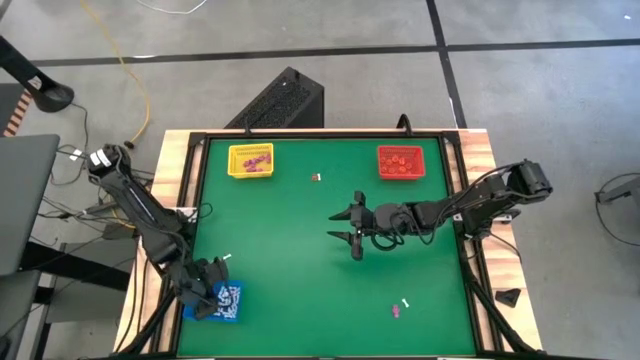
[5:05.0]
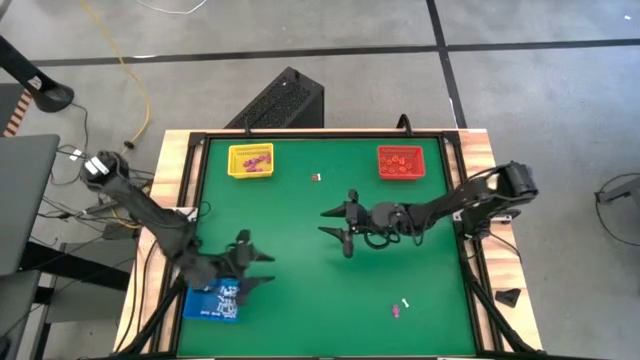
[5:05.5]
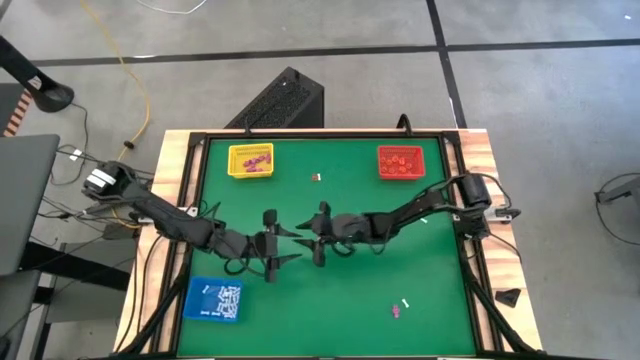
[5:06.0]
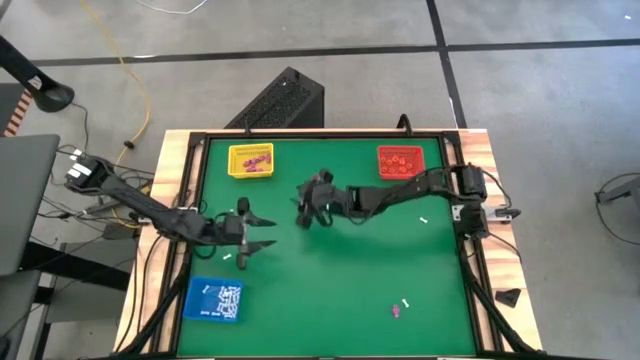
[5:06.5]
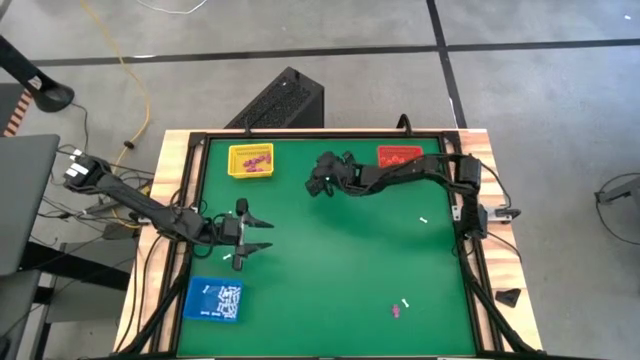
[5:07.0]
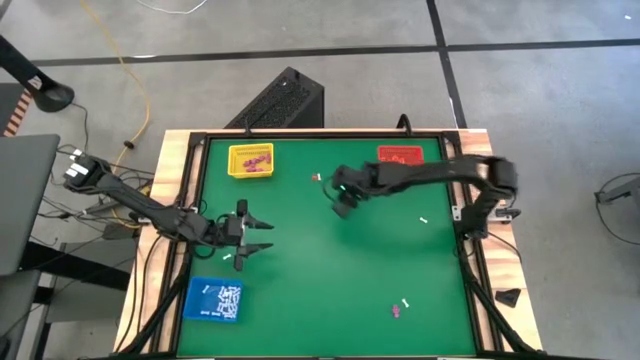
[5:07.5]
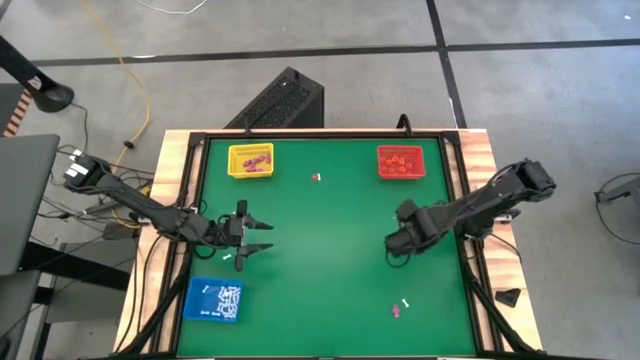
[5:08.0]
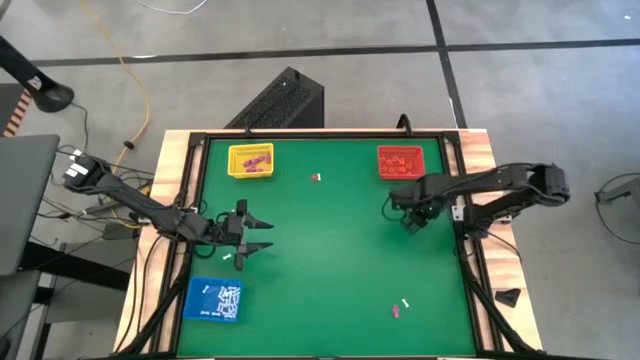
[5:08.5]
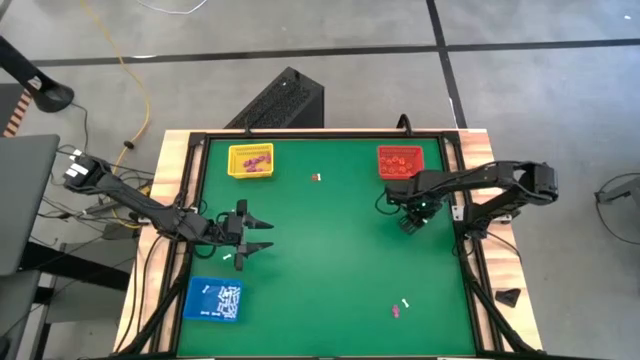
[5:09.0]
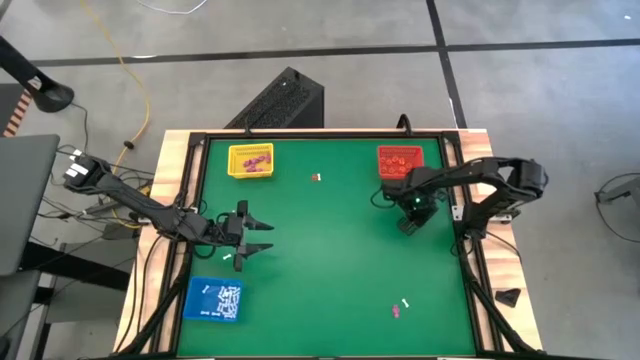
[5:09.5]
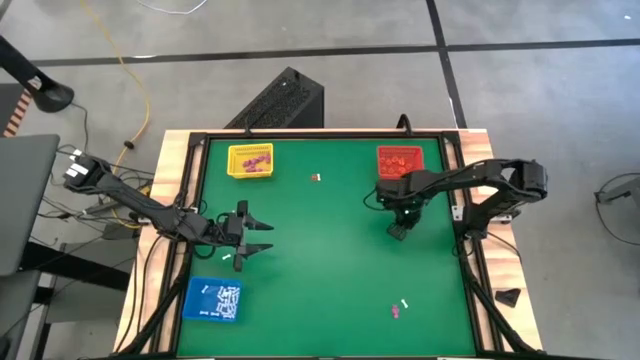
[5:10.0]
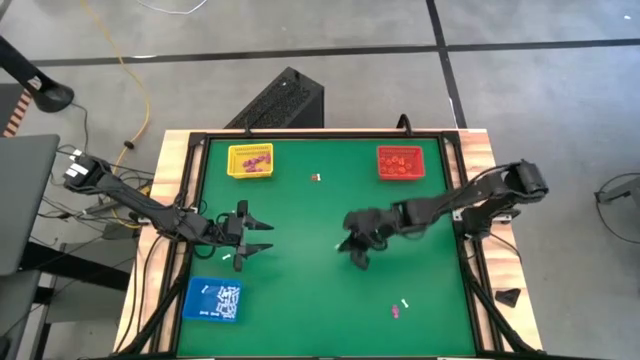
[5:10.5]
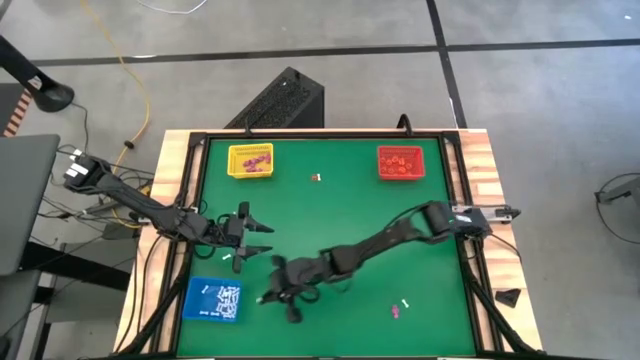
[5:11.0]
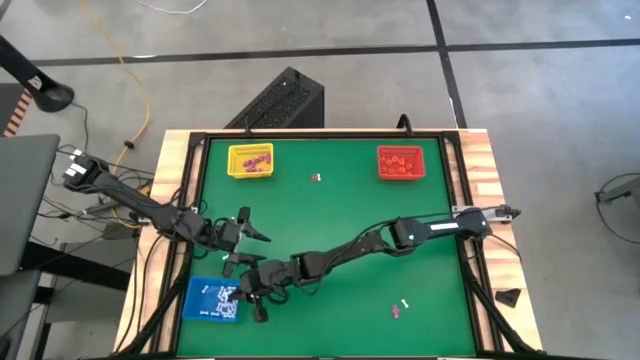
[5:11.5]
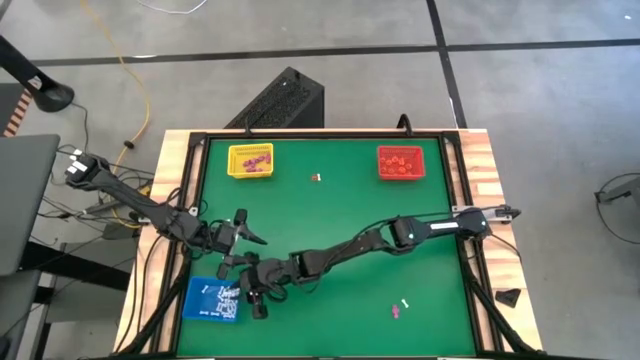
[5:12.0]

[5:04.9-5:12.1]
Task: Sort Halloween decoration
Put the white bone toy into the blue bin

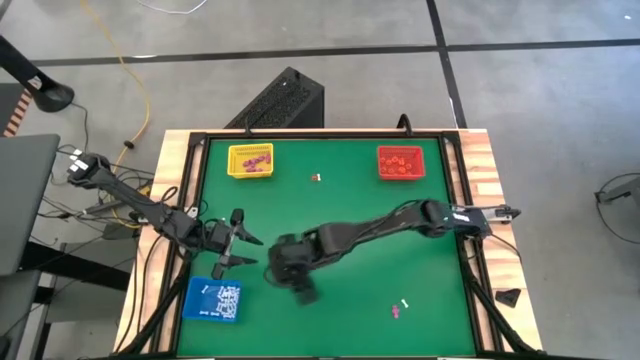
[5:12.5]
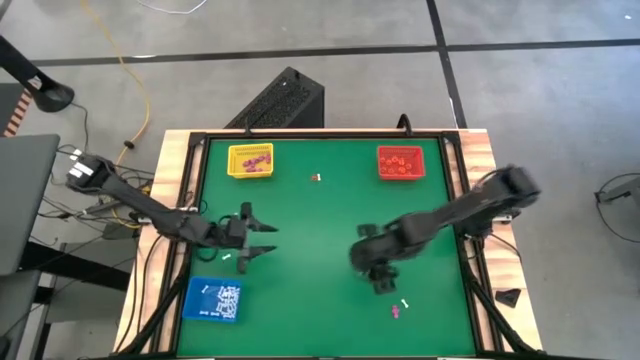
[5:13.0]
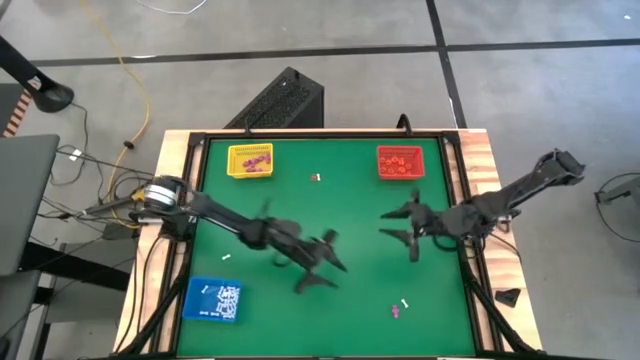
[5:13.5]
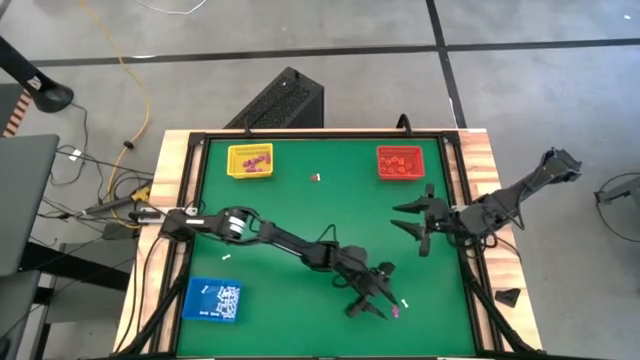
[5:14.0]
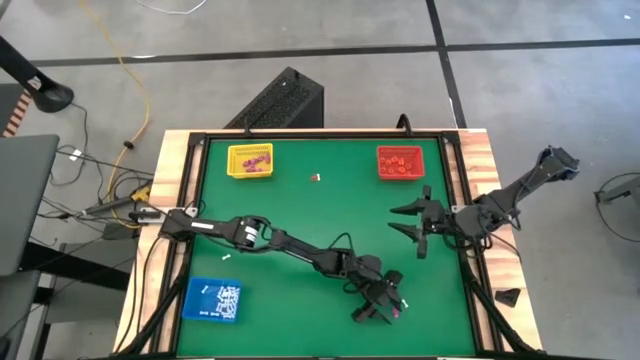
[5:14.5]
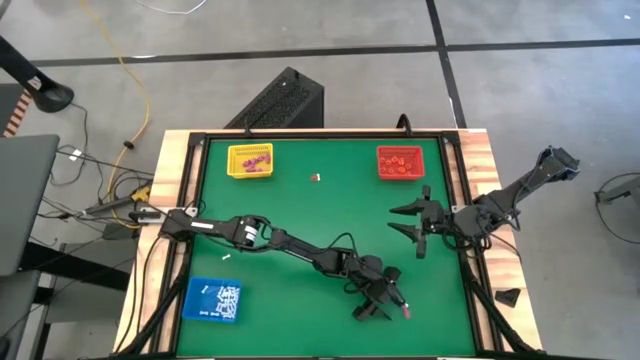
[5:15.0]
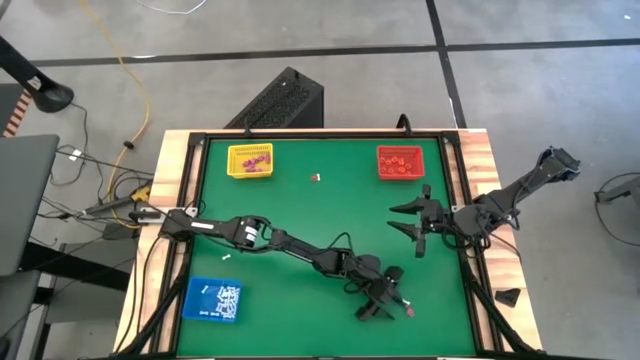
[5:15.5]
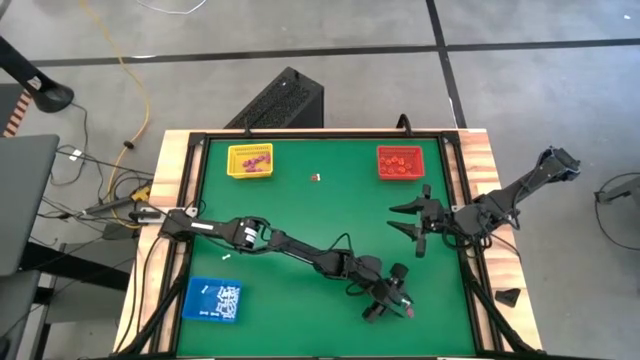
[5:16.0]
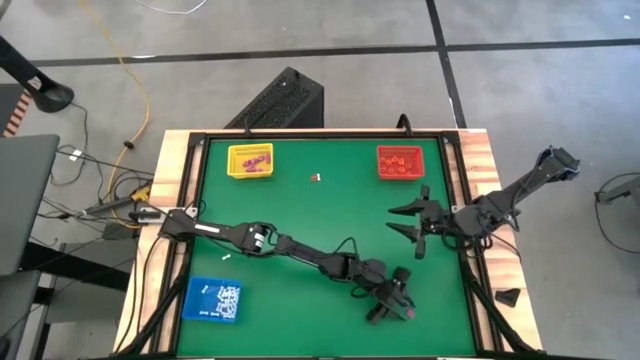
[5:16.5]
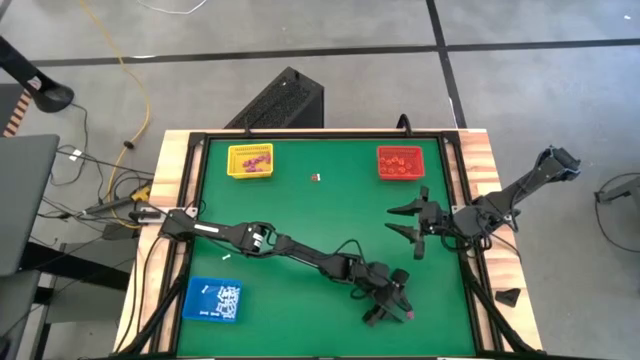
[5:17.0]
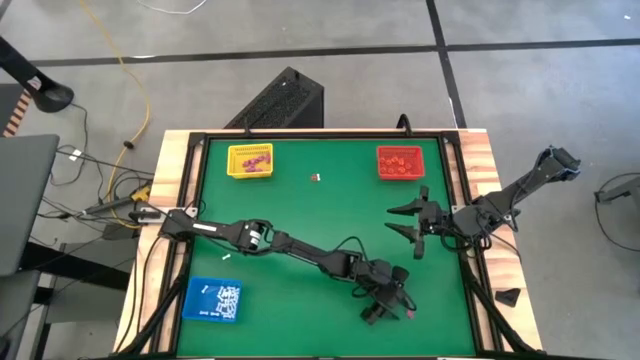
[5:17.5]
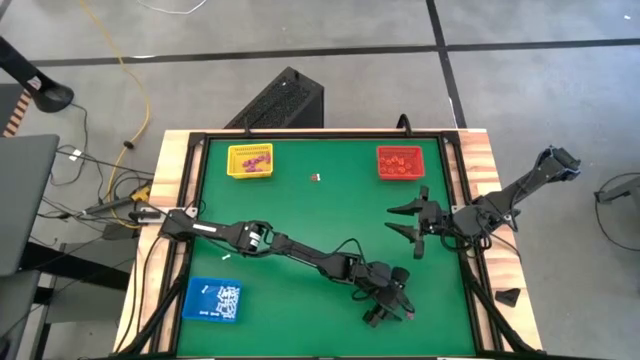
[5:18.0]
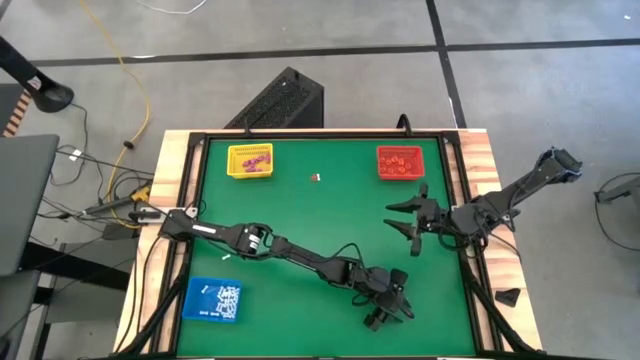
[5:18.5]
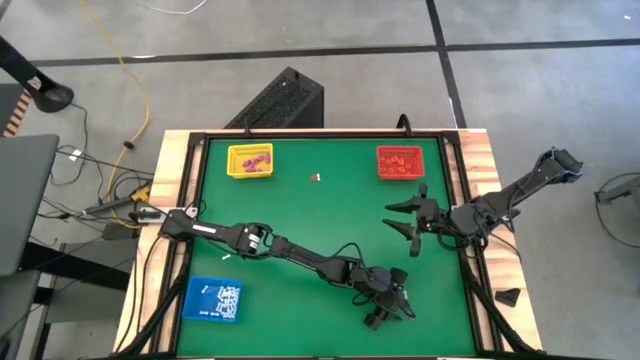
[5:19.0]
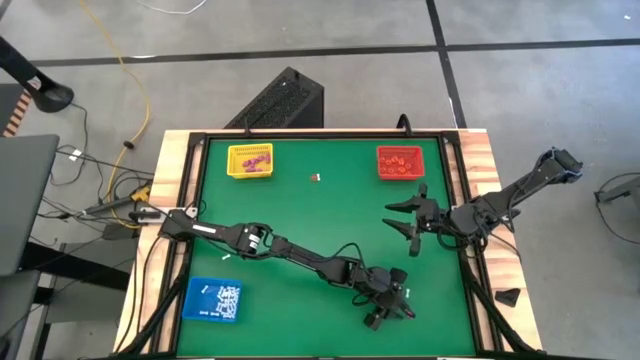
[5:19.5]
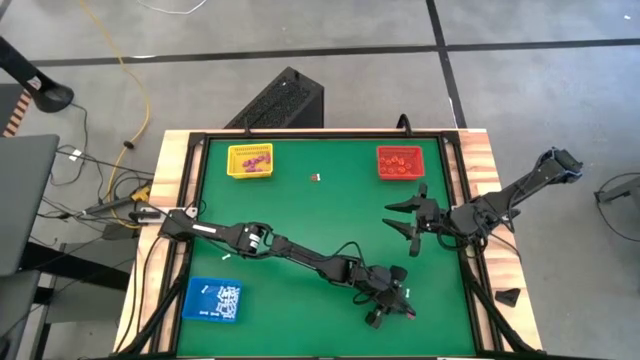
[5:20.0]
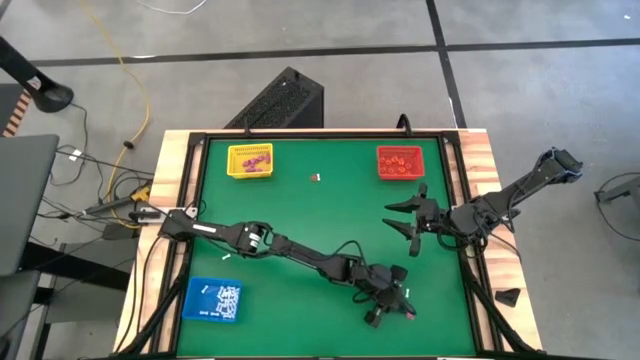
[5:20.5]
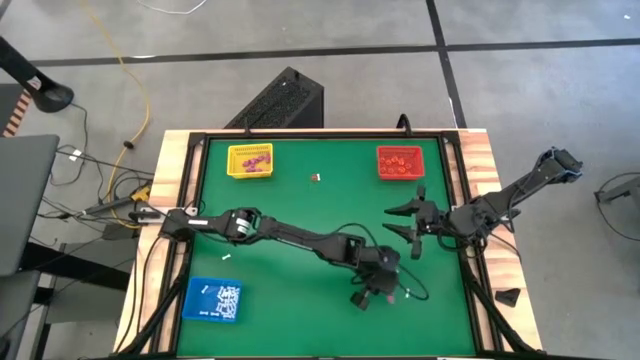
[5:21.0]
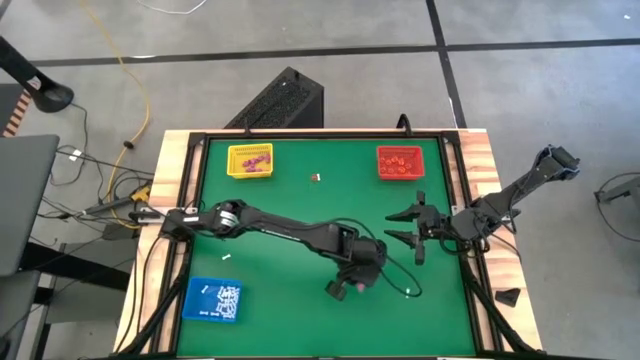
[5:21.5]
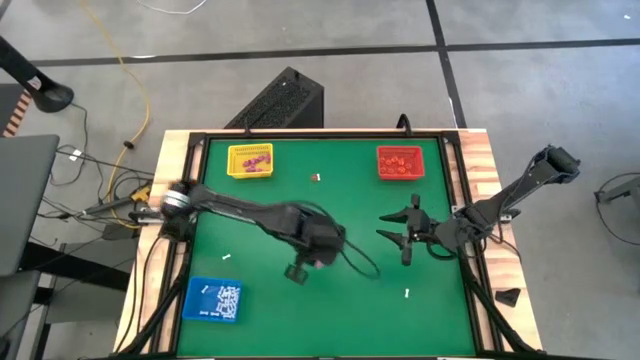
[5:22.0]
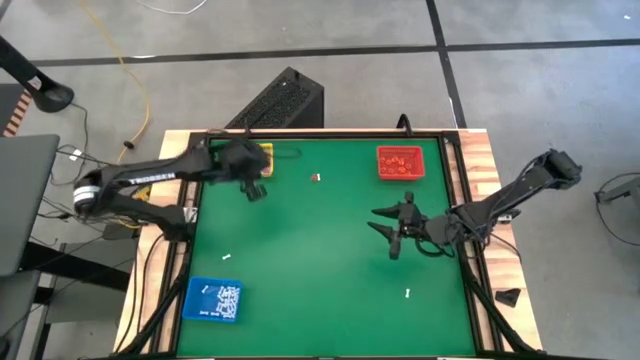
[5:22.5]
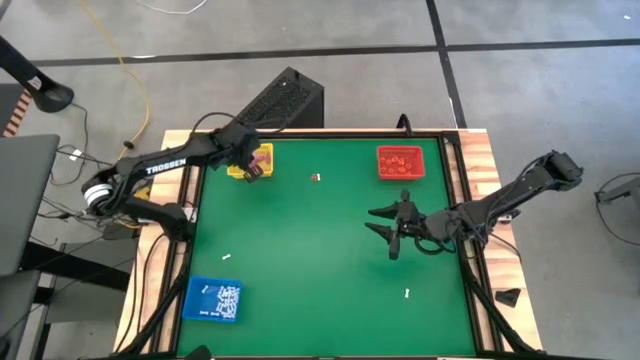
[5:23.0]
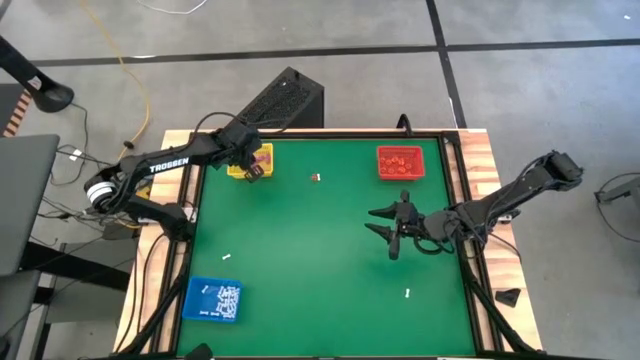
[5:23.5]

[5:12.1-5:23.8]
Put the pink skeleton toy into the yellow bin

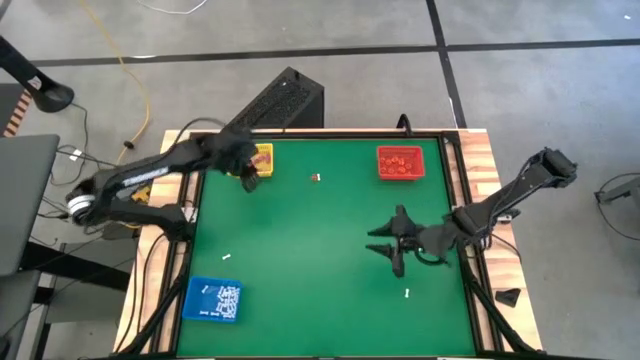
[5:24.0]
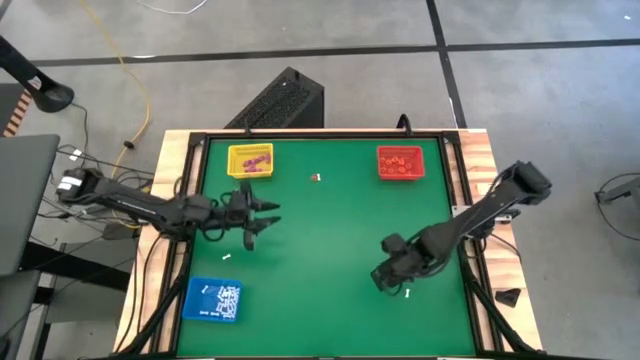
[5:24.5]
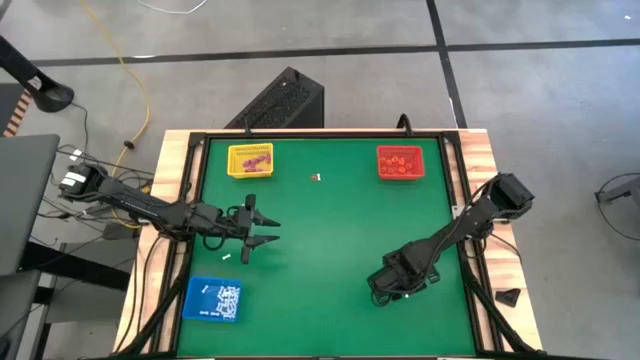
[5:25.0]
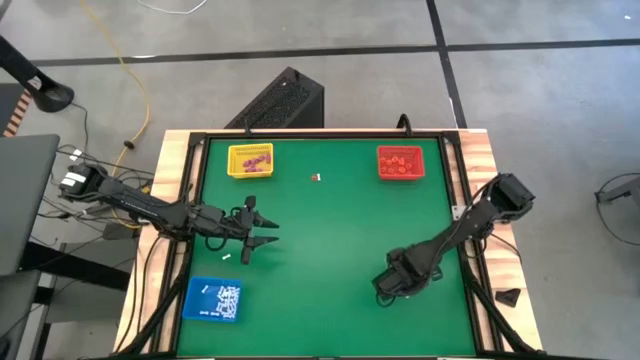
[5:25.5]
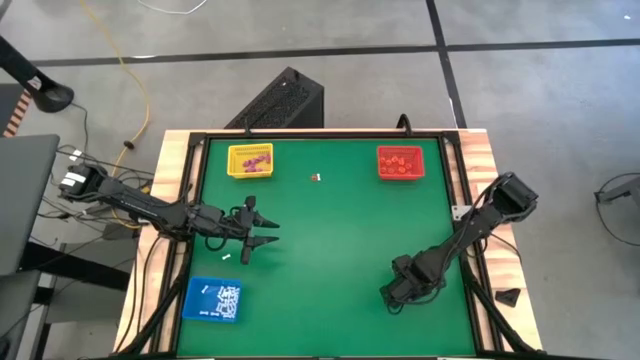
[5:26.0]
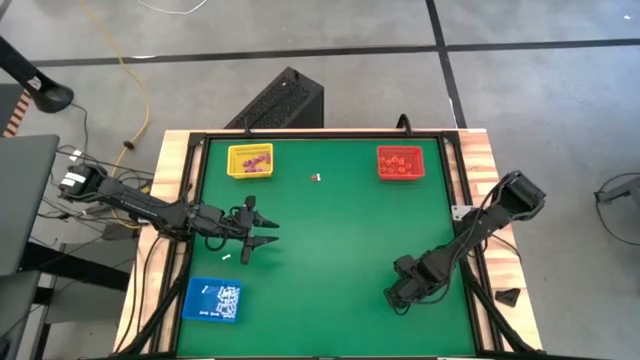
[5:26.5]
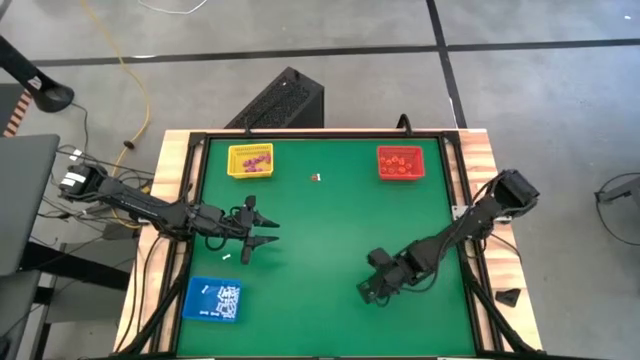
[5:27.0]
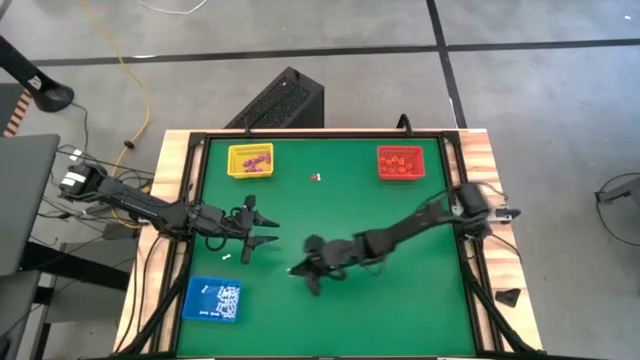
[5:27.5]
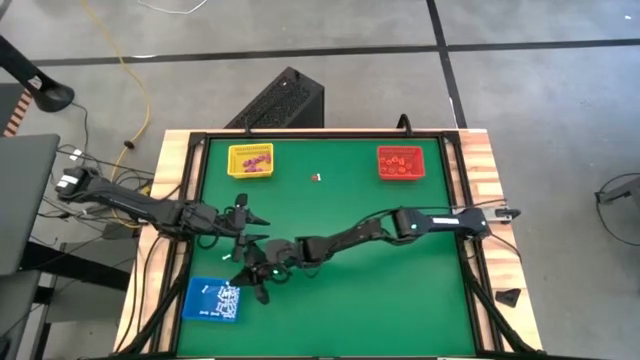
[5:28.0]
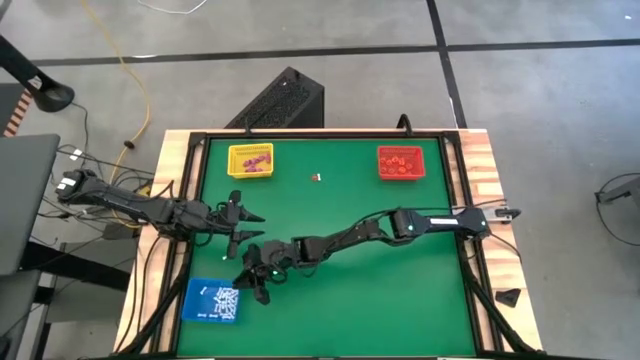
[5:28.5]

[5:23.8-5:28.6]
Put the white bone toy into the blue bin
